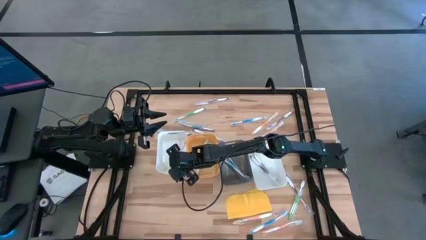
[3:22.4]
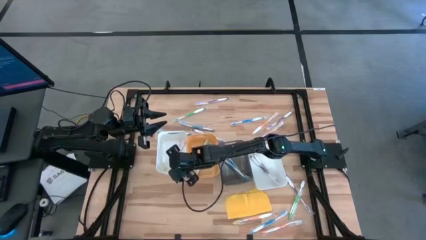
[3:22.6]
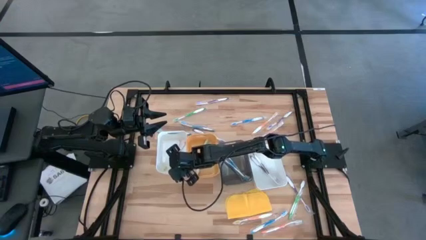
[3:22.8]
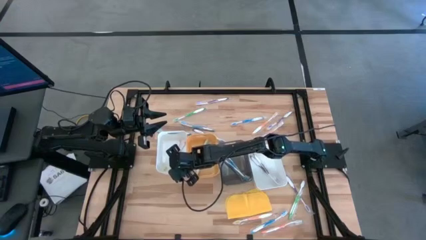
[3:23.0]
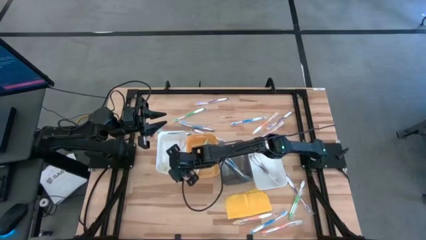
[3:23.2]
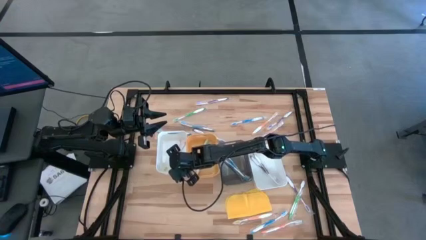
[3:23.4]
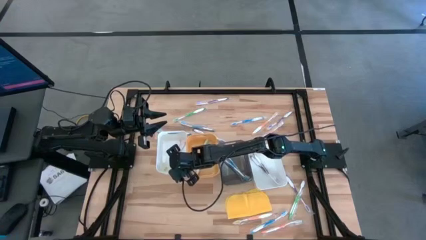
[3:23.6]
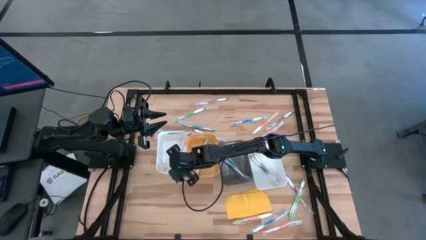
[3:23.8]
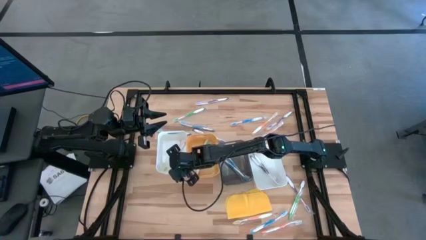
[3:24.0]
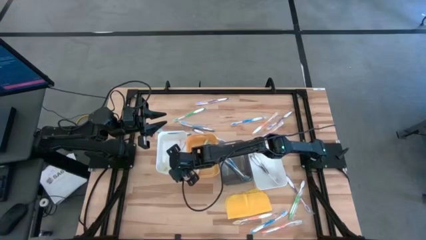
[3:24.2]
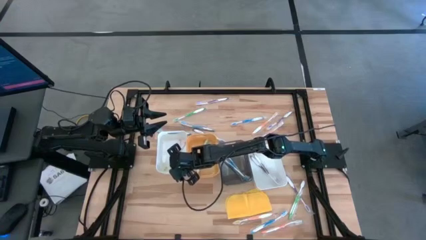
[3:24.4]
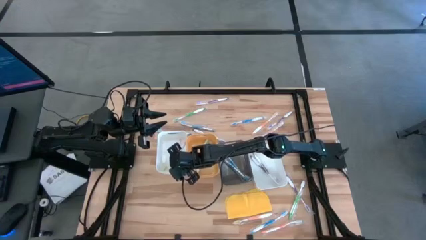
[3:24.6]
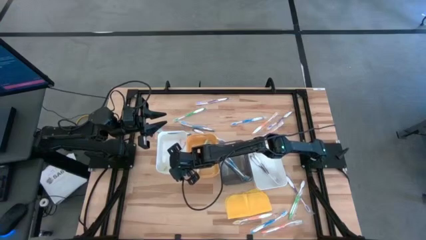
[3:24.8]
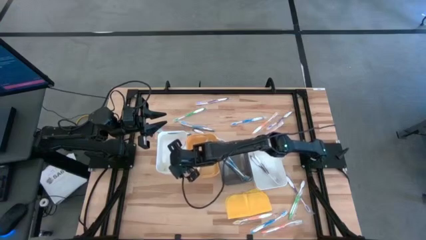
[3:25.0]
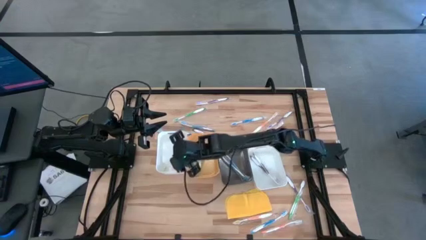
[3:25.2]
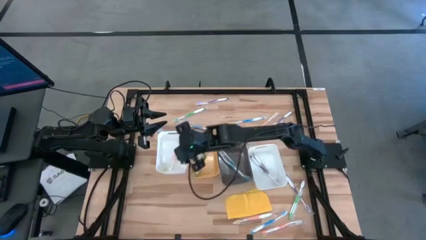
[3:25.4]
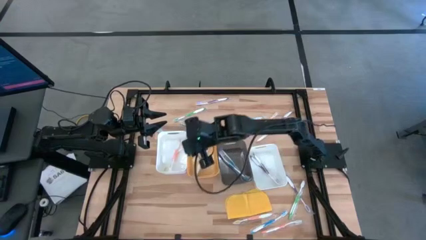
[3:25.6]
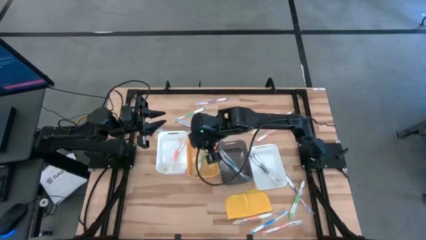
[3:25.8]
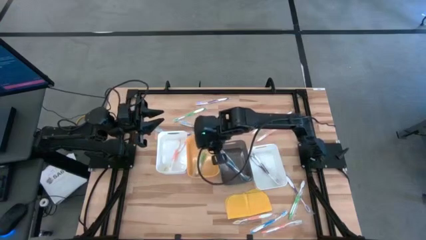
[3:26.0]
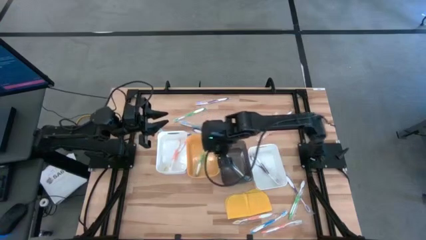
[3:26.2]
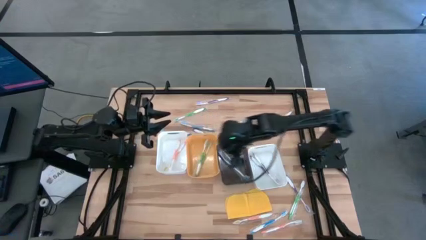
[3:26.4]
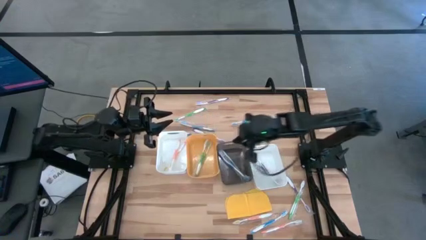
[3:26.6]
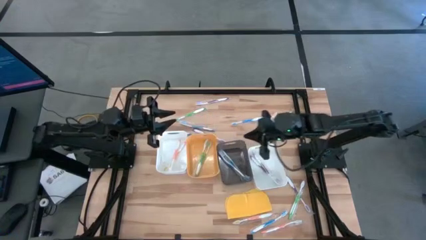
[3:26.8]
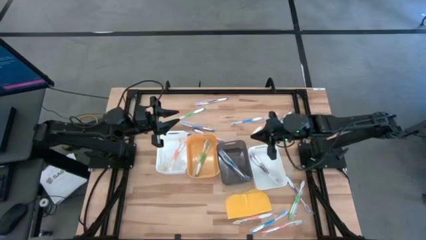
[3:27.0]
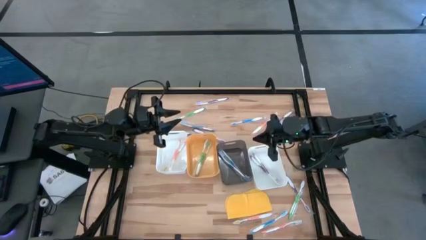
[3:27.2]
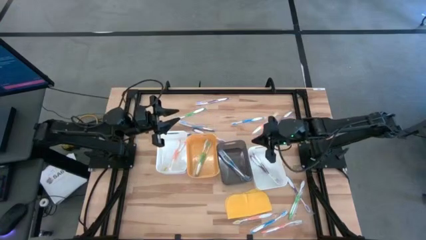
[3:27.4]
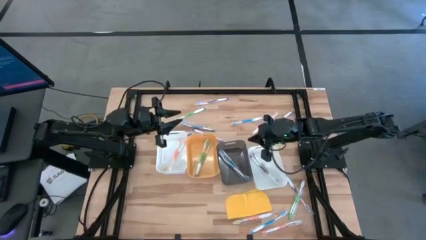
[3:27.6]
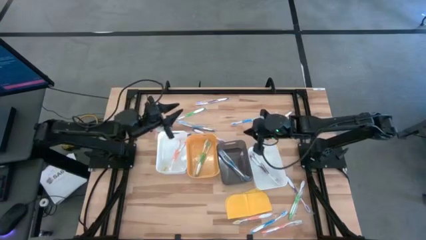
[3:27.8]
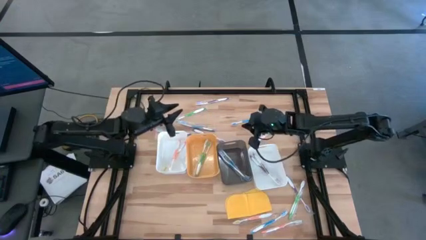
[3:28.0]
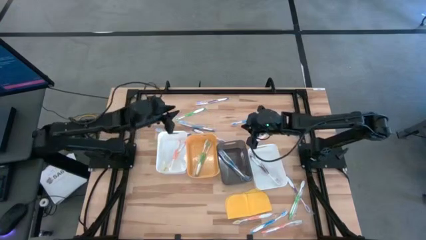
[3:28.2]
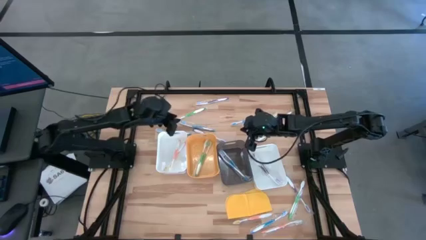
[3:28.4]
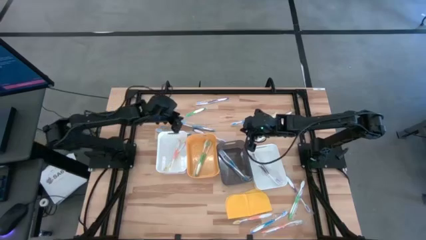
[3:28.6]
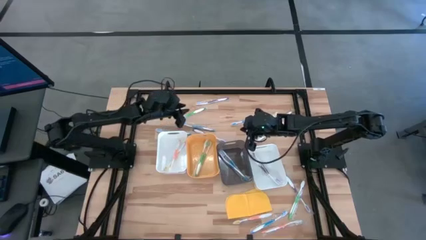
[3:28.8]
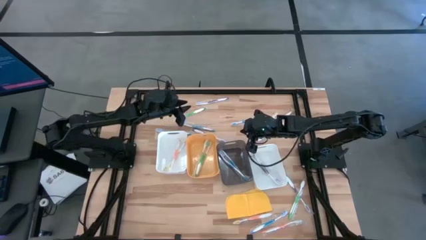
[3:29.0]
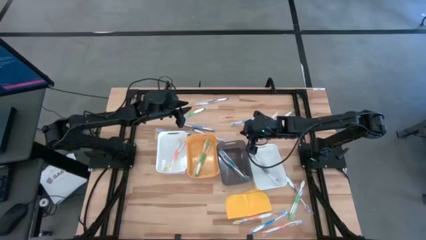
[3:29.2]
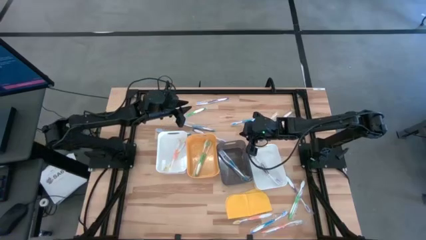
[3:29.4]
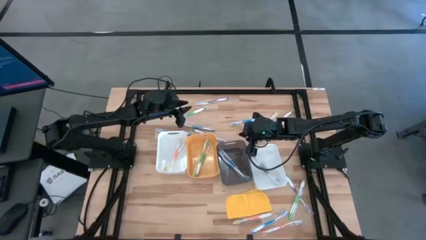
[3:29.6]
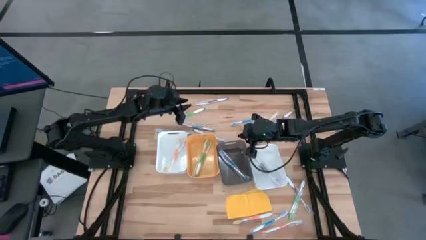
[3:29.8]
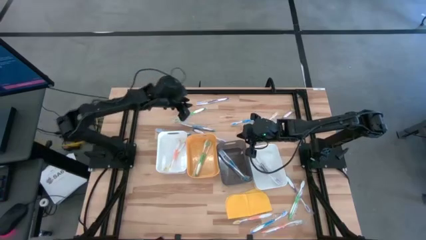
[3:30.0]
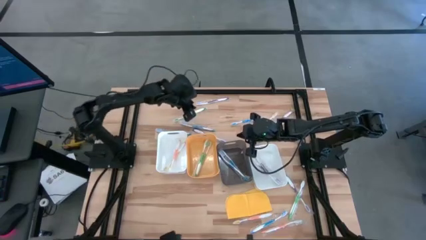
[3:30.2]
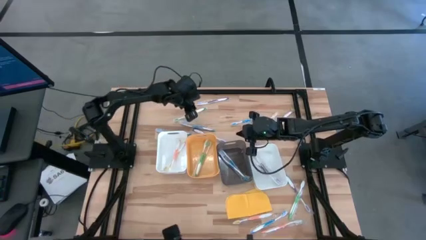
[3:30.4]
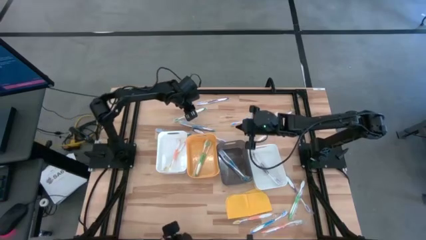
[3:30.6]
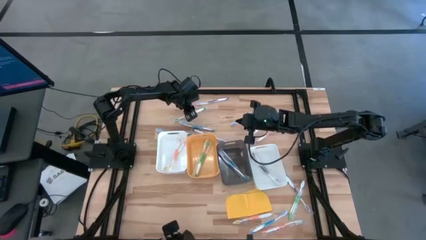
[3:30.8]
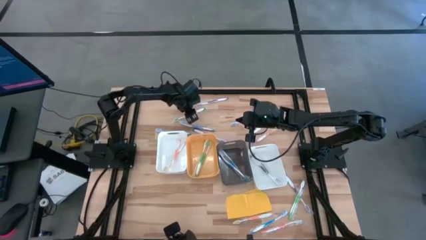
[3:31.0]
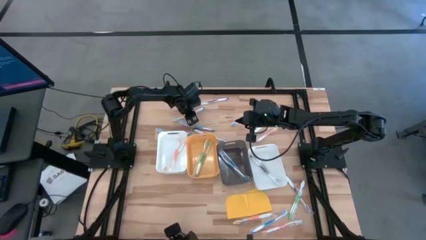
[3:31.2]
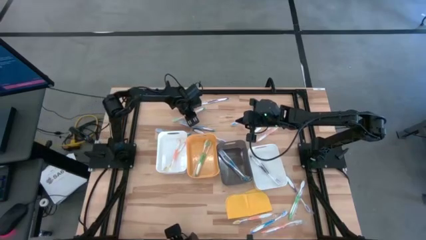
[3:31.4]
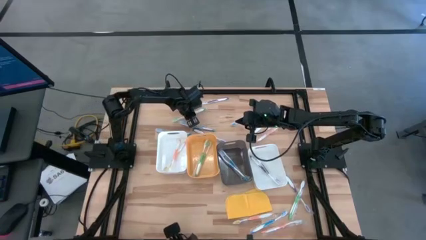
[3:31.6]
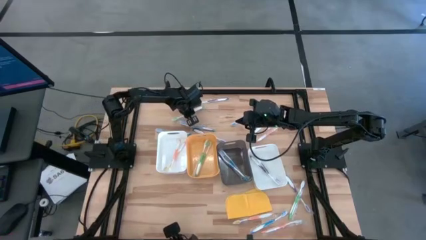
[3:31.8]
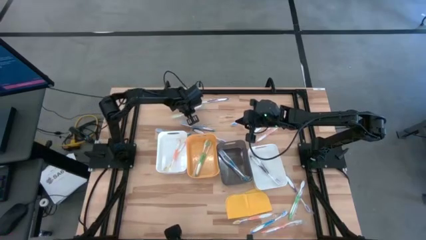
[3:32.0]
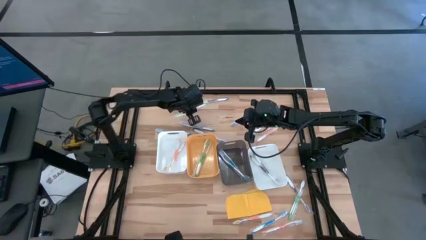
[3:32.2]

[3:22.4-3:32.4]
Task: Pick & Place Toothbrushes
Put the green toothbrush into the yellow bin

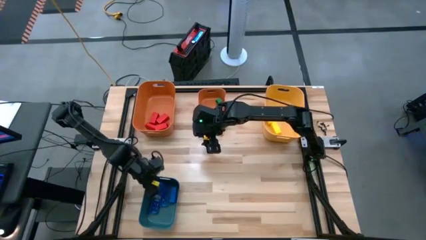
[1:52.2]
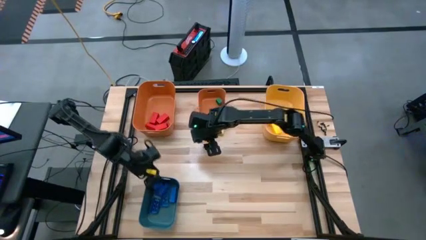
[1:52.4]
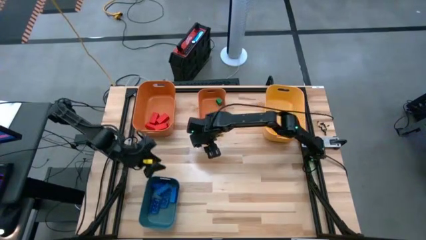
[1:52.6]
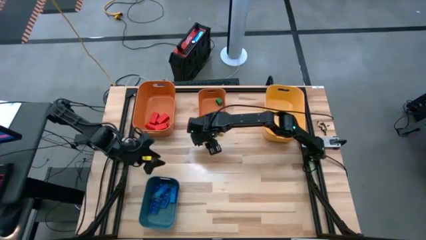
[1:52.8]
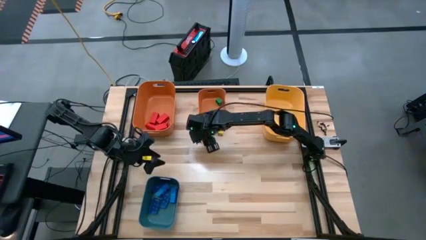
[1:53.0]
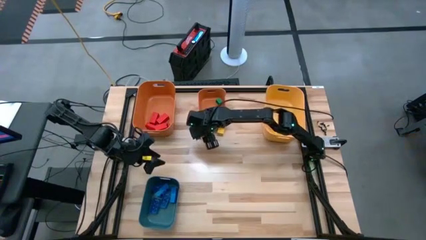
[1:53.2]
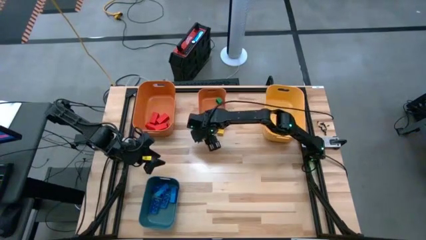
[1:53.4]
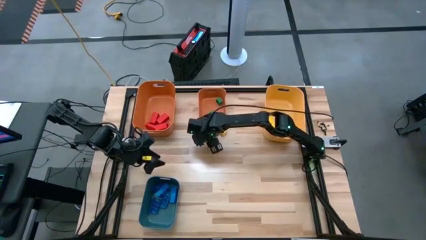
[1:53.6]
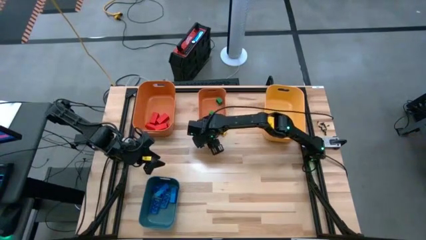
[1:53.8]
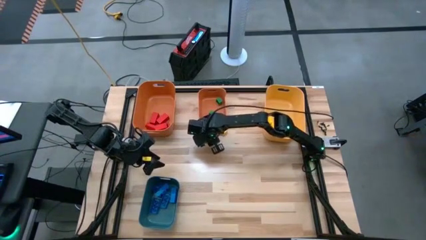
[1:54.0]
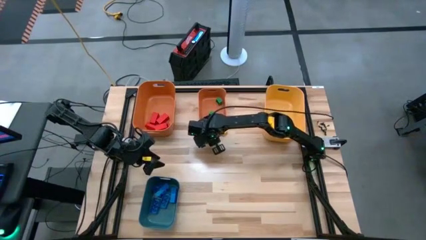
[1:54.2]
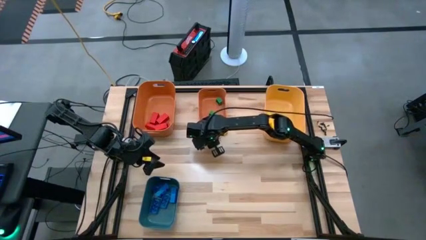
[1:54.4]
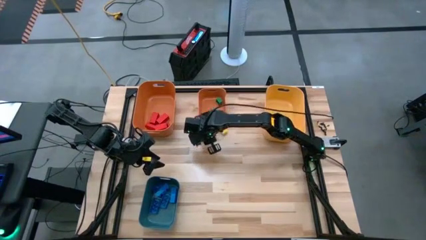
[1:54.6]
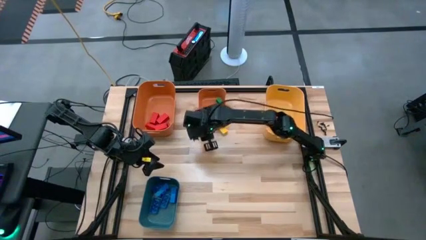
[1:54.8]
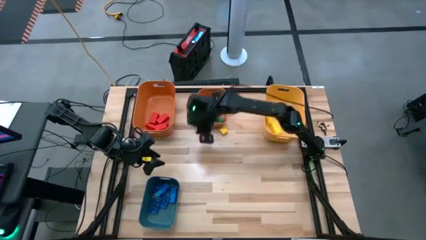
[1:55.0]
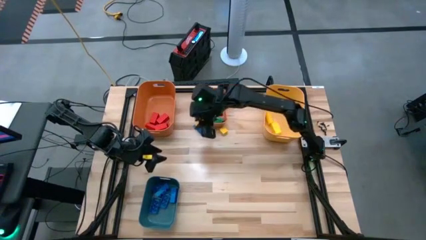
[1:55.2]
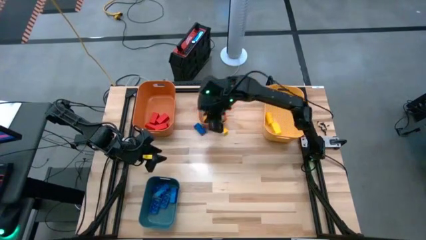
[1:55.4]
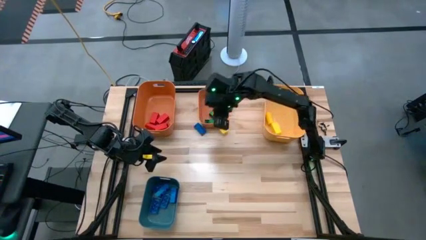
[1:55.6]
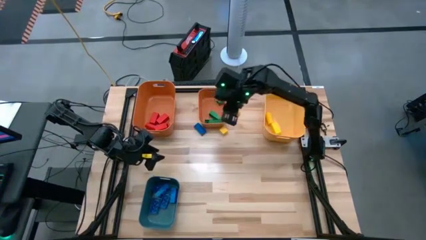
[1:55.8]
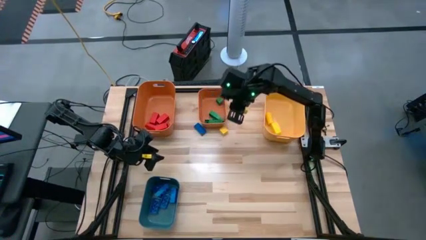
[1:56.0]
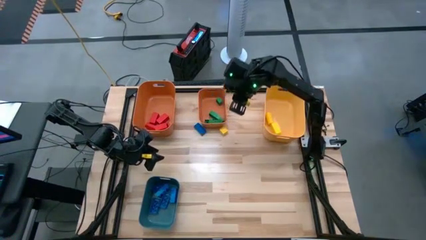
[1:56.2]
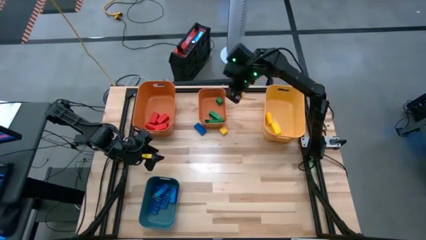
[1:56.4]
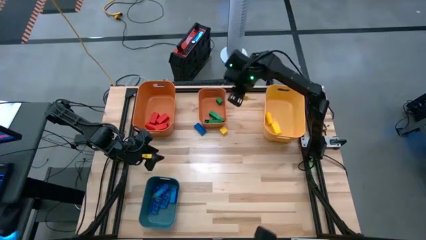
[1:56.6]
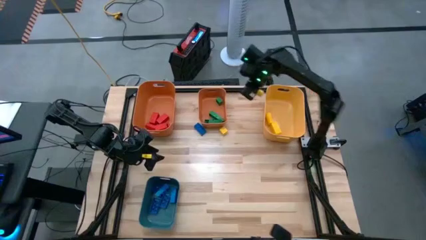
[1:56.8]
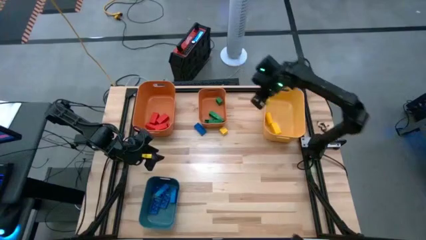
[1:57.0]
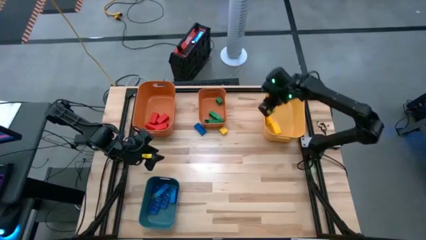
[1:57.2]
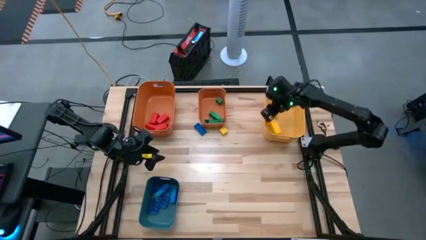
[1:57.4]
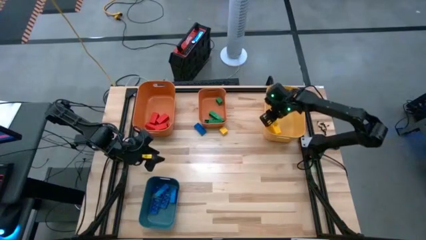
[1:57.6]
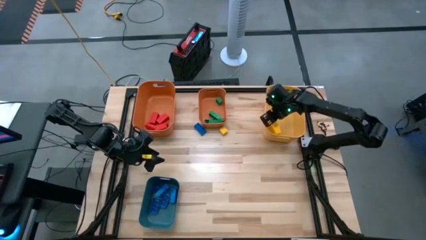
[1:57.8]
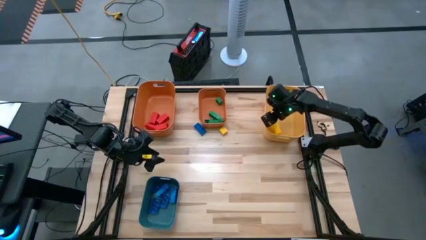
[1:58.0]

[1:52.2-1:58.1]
Task: Sort blocks
Put the yellow block into the yellow bin
